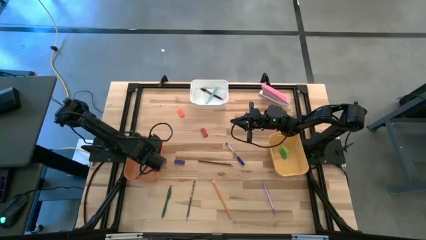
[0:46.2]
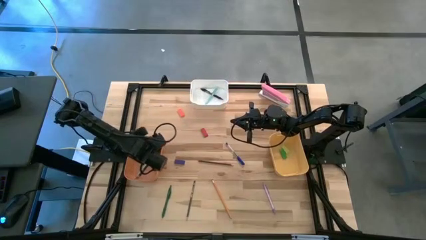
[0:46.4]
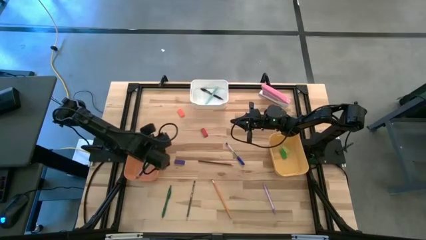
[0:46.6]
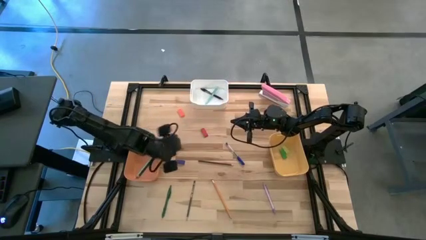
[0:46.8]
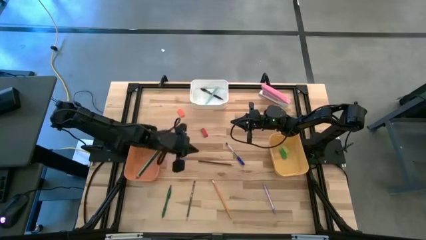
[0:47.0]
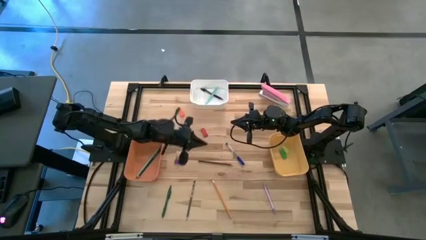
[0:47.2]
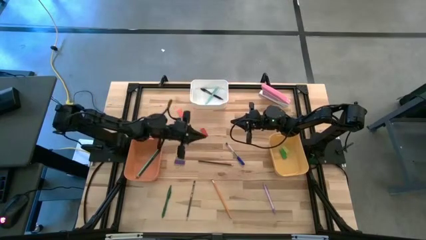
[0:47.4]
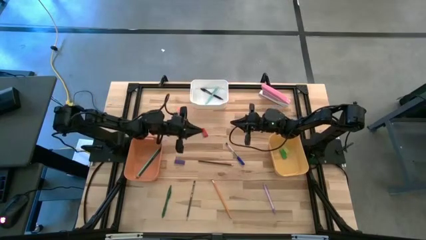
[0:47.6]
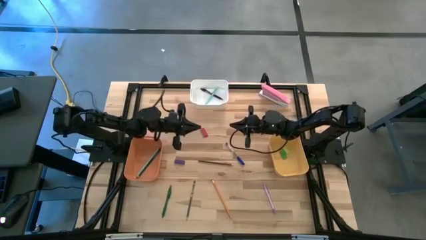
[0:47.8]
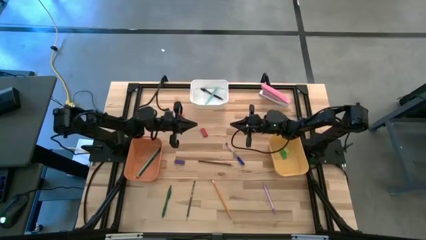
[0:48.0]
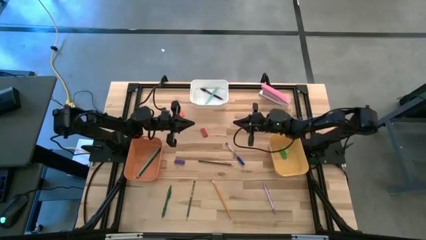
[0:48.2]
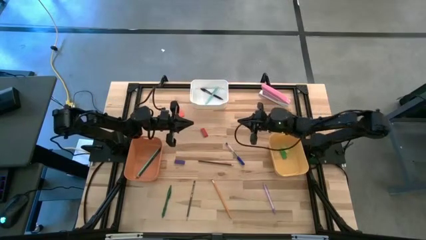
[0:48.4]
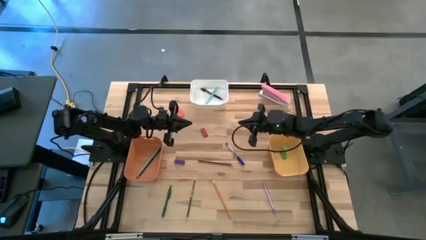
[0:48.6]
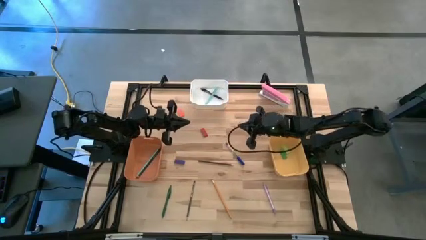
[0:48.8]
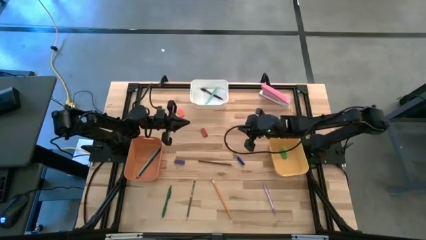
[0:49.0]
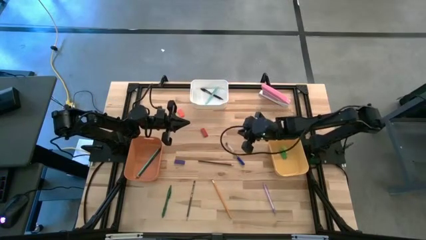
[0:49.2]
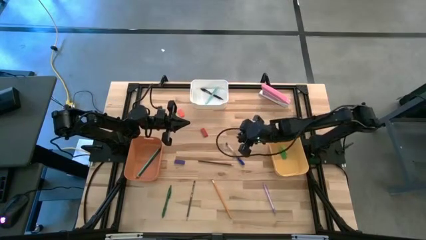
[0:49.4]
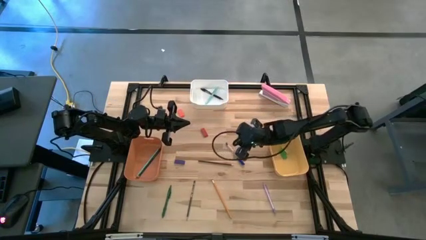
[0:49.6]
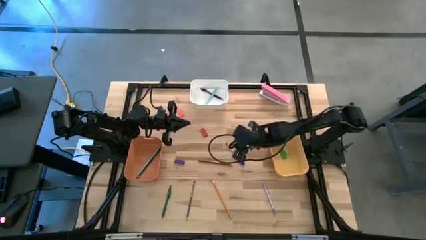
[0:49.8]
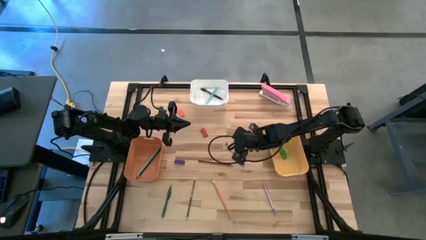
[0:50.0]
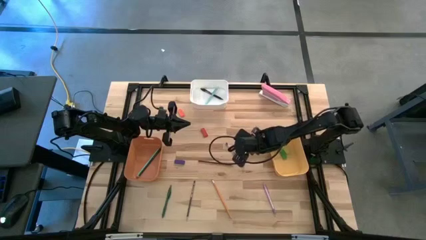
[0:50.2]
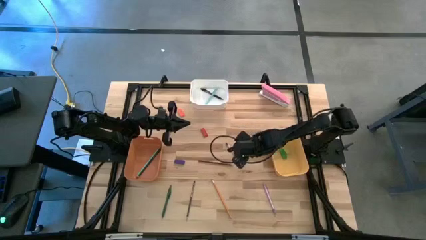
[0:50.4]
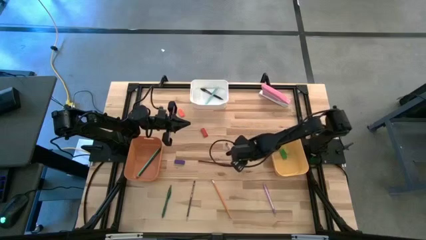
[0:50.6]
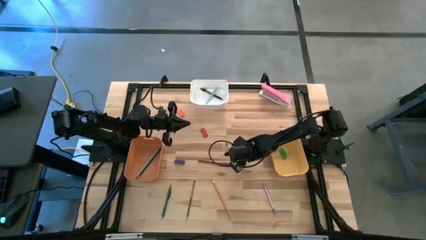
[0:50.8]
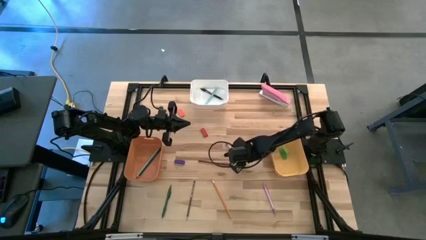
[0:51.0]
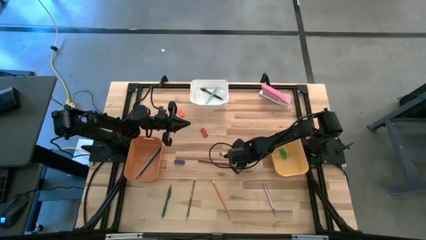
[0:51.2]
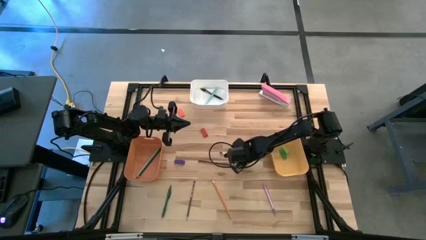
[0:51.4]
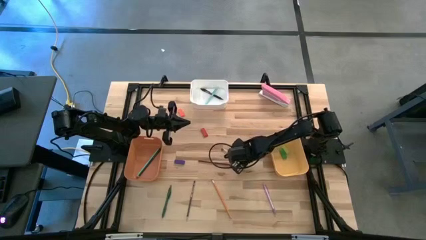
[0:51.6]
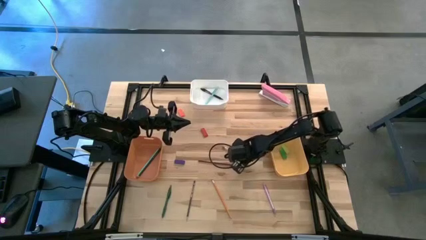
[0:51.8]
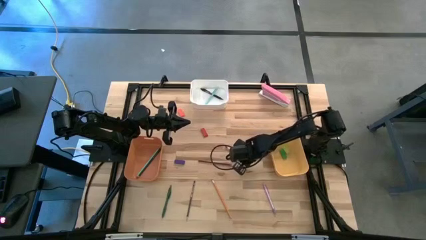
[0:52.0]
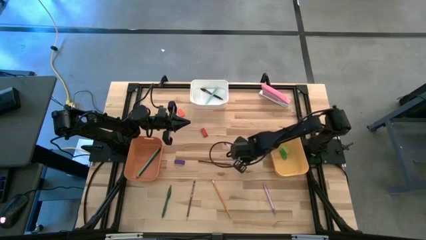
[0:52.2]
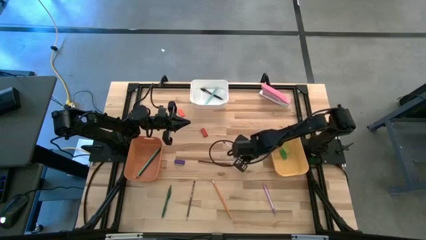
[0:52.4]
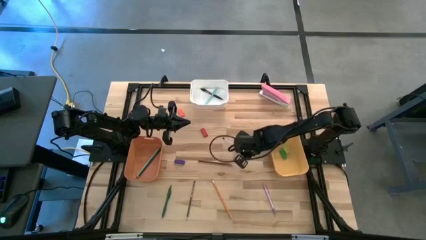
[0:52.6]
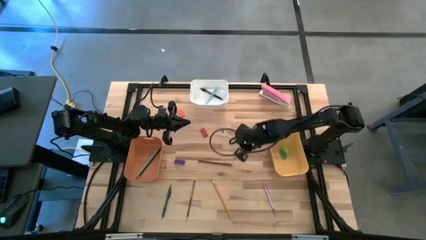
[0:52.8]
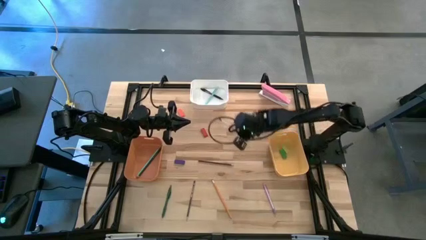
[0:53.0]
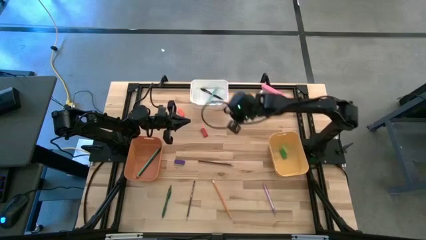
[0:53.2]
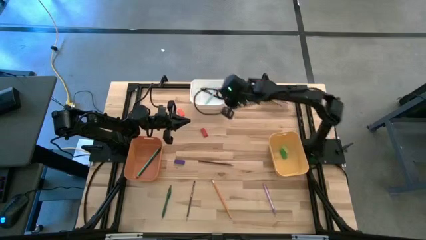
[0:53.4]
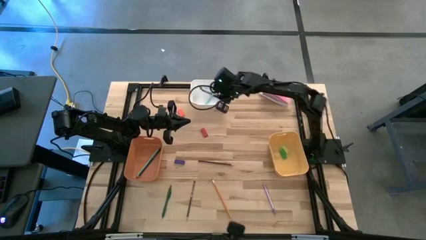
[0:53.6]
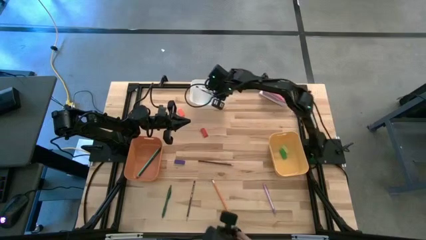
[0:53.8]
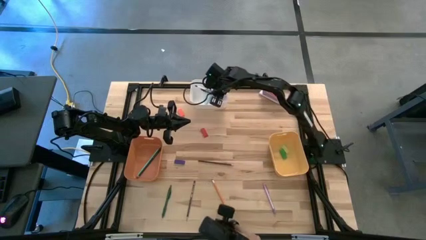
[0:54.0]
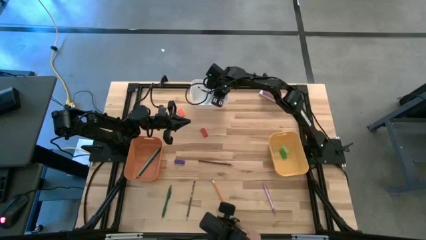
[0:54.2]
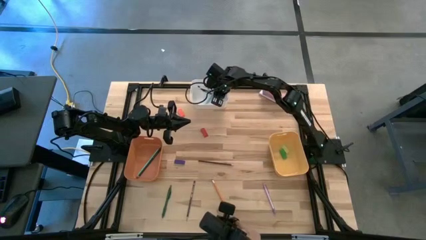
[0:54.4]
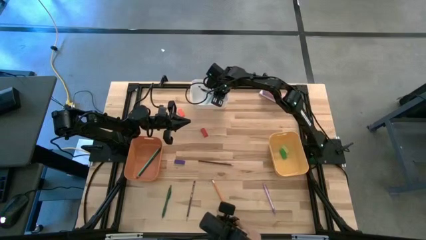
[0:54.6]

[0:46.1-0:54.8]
Task: Sort crayons/erasers/pens/pencils in bins
Put the blue pen into the white bin

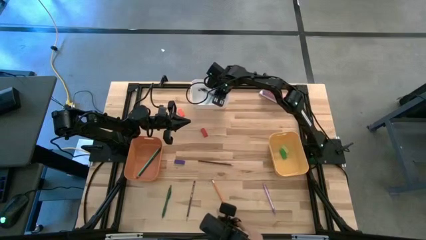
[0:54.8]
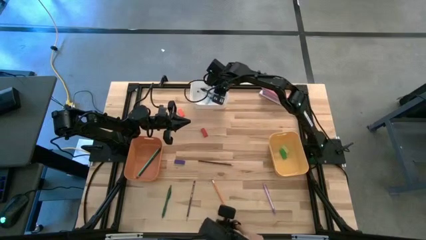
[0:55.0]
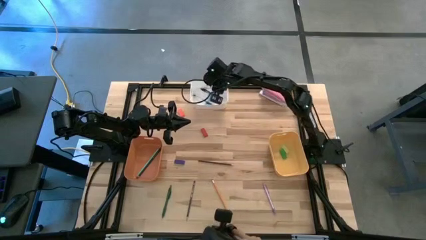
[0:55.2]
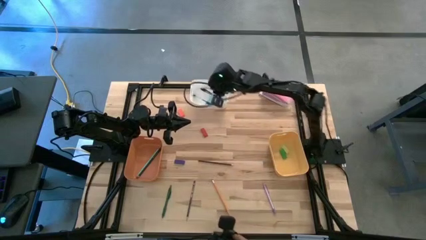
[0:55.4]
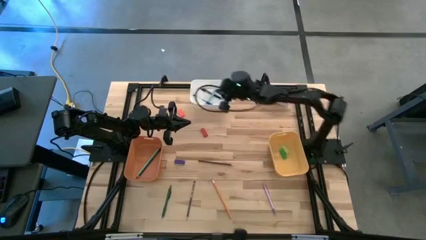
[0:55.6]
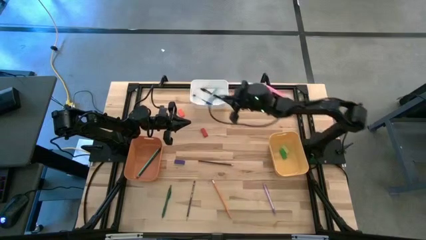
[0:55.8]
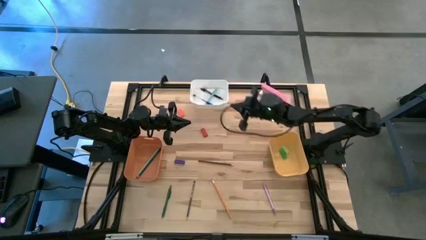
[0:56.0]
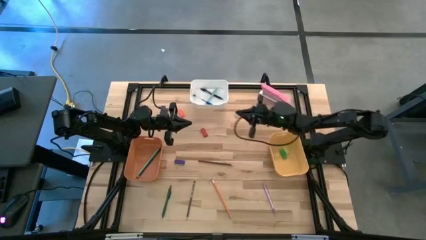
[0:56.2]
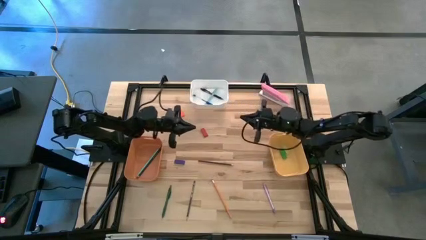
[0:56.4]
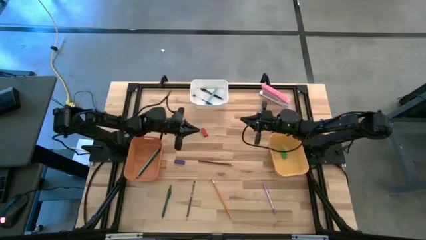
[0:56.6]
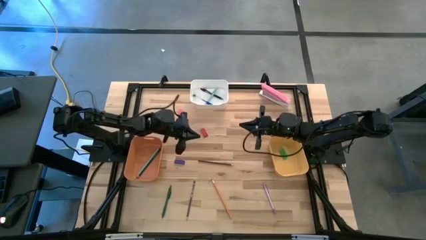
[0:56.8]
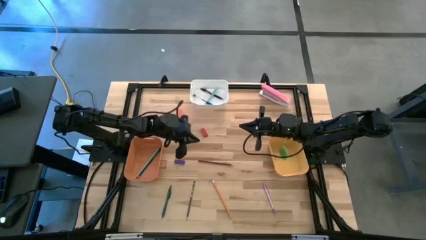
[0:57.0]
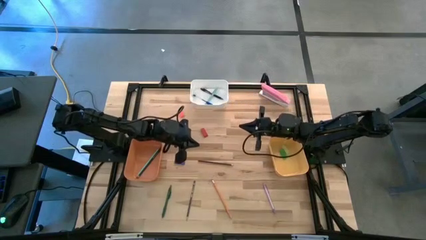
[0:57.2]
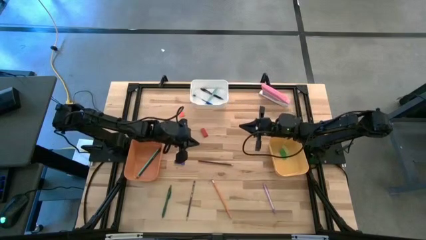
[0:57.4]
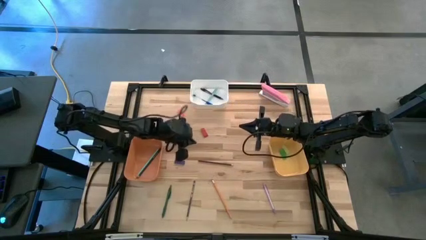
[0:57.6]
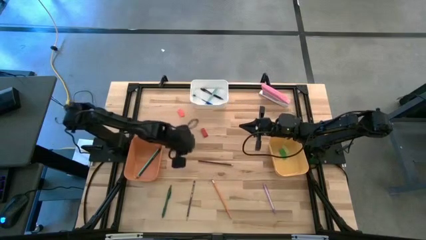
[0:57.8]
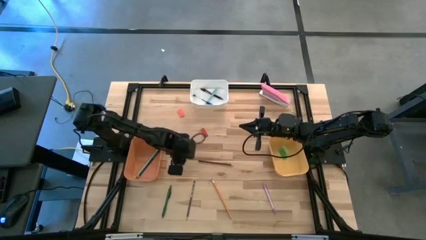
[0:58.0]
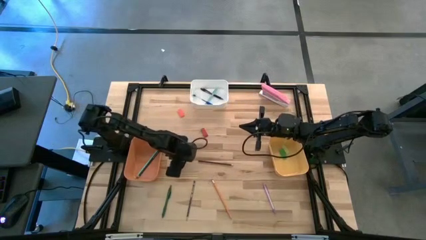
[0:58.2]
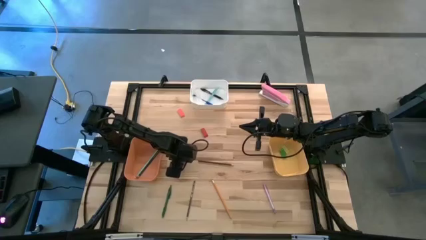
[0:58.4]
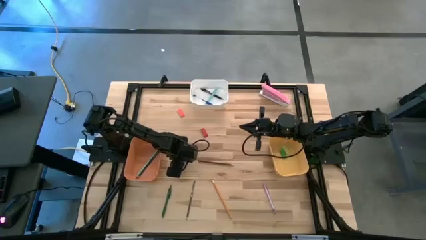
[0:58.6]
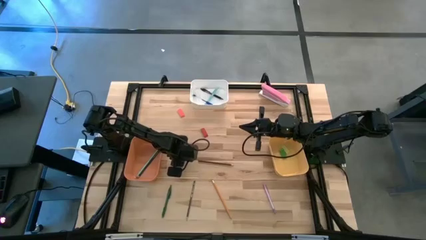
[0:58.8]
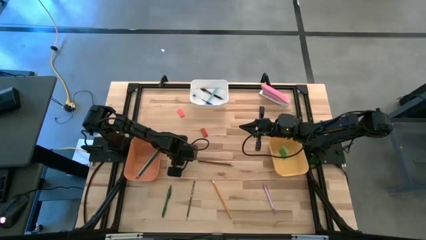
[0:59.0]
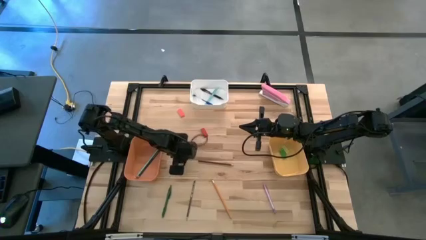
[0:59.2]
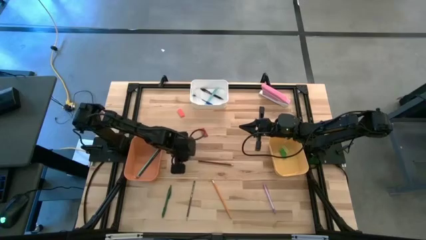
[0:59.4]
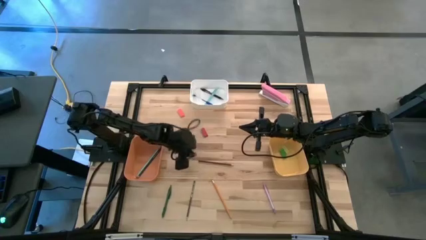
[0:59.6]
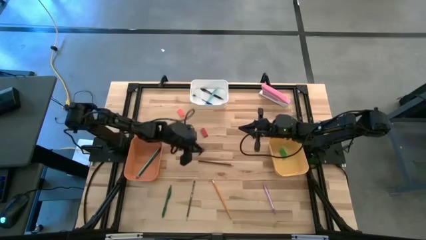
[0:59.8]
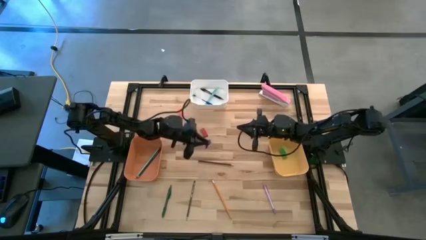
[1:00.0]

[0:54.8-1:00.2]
Put the blue eraser into the yellow bin

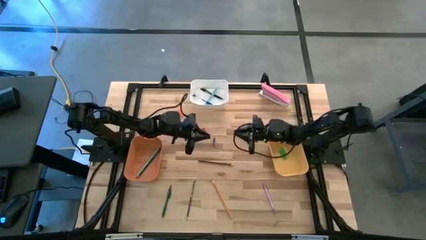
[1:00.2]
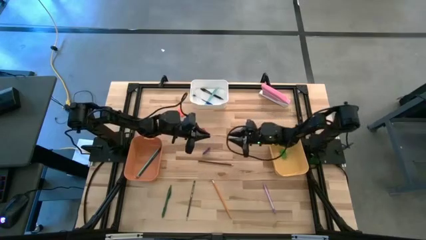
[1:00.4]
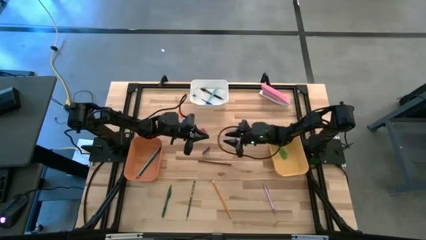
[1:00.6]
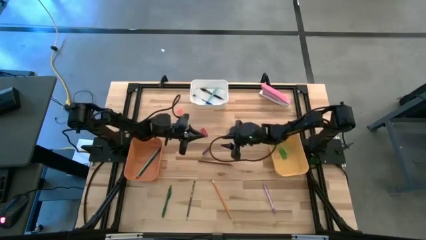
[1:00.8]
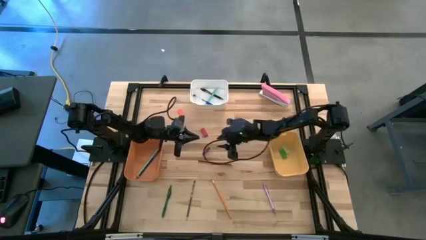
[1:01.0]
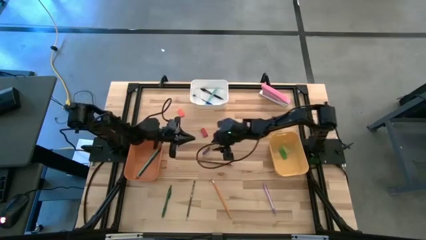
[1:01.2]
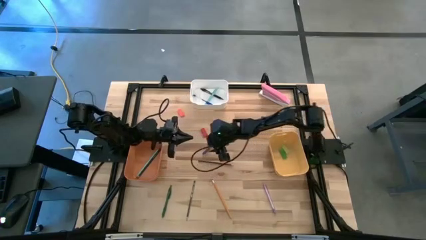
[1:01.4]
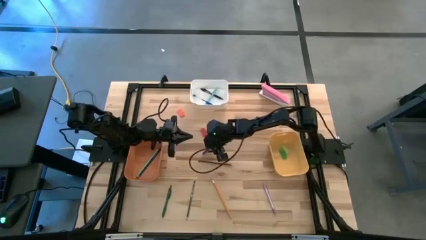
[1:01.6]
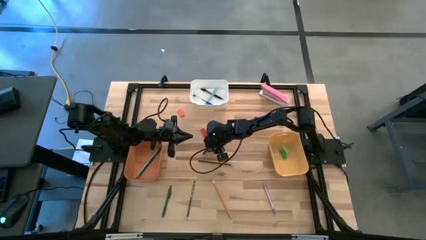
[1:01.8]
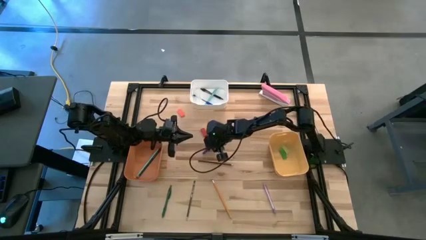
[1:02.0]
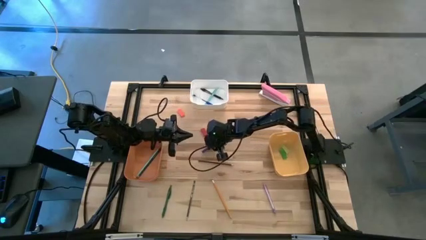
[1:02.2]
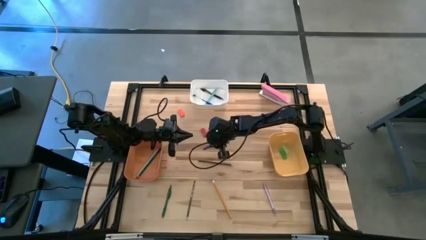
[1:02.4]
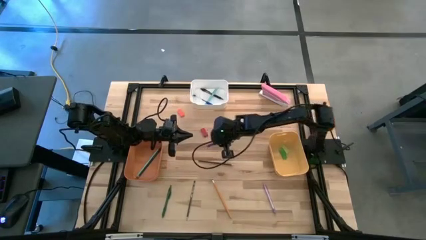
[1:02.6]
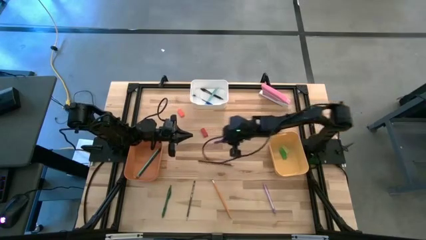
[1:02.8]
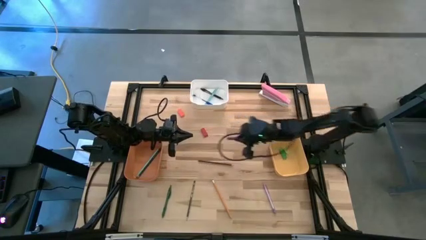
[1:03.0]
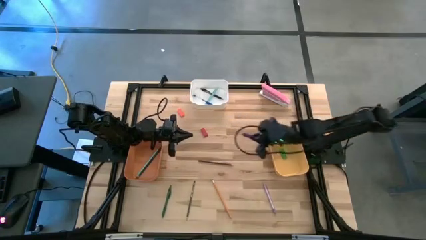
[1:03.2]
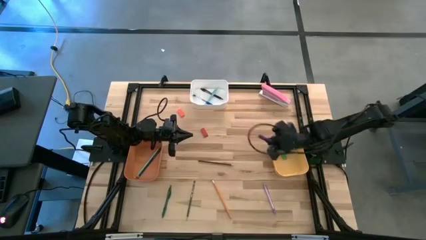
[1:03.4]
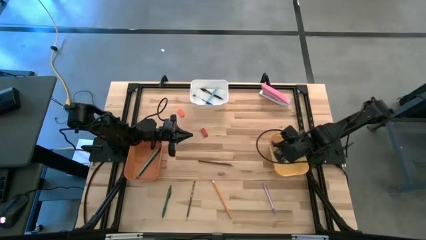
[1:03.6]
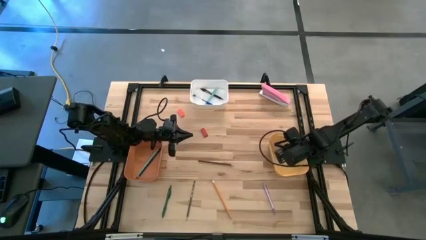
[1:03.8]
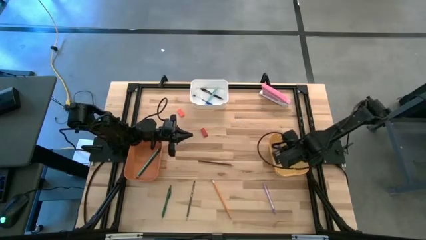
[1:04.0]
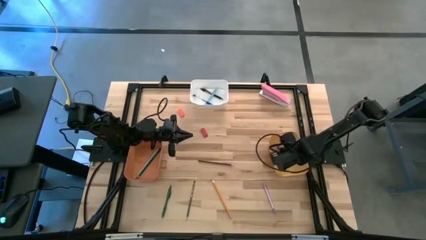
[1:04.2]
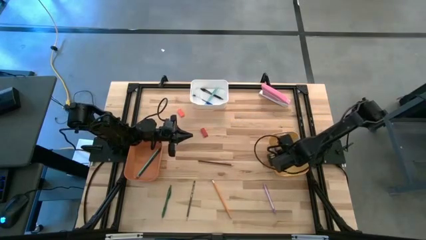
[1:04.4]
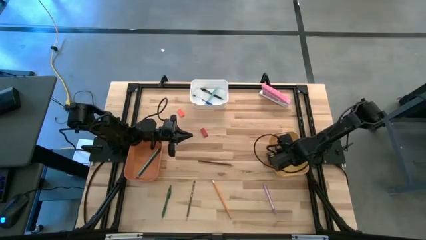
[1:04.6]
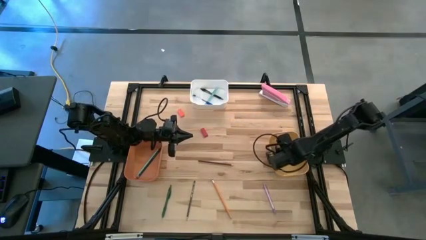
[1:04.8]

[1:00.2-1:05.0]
Put the blue eraser into the yellow bin
